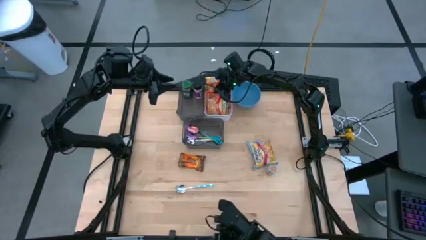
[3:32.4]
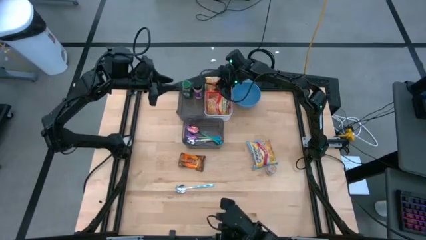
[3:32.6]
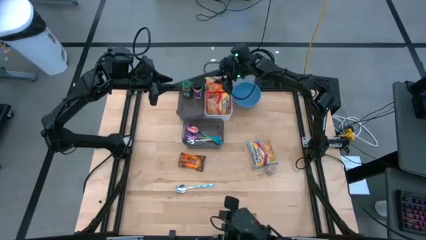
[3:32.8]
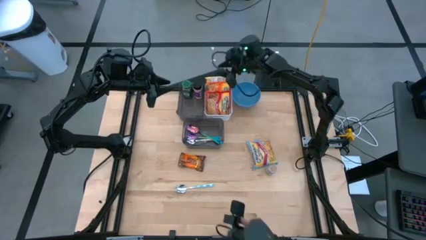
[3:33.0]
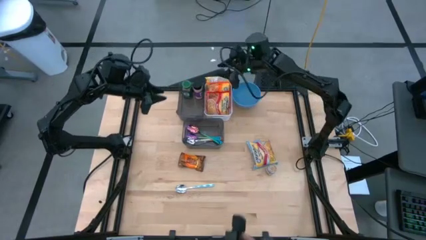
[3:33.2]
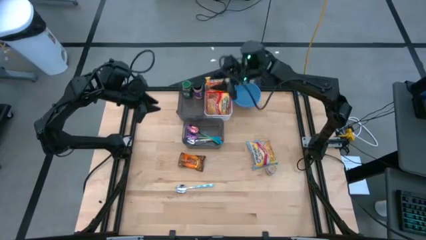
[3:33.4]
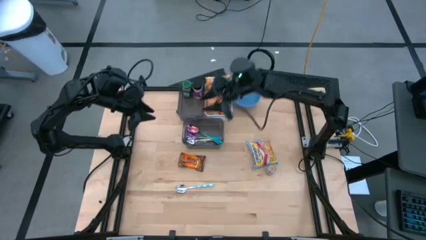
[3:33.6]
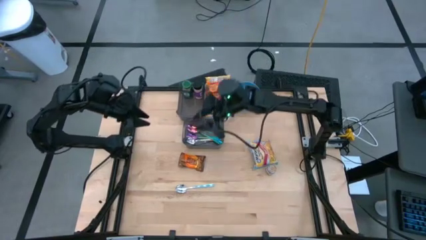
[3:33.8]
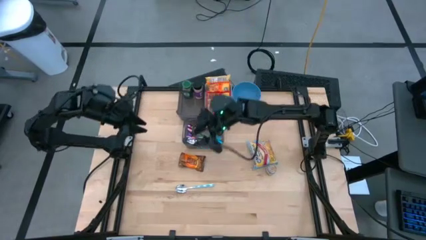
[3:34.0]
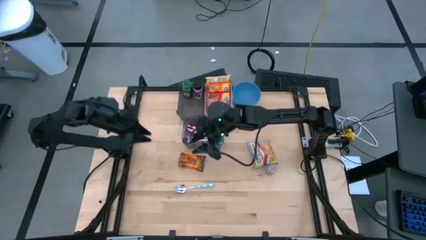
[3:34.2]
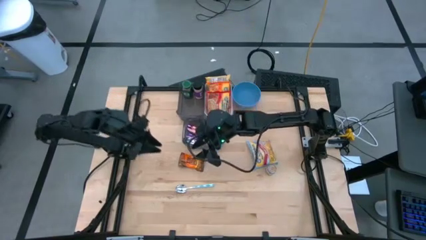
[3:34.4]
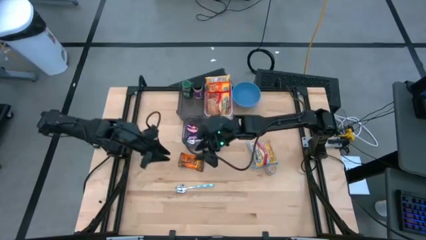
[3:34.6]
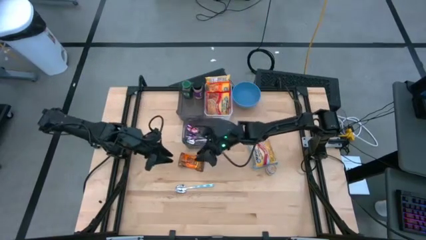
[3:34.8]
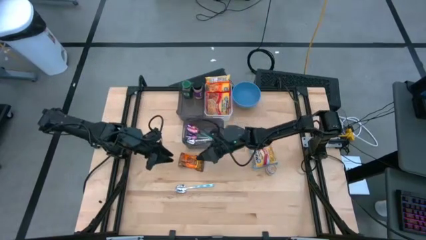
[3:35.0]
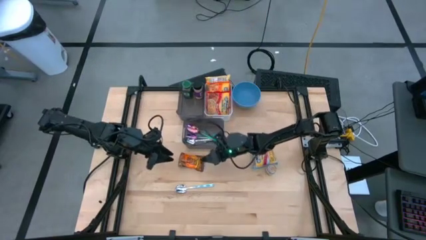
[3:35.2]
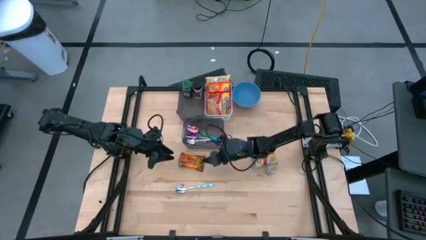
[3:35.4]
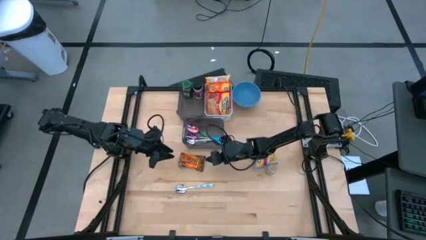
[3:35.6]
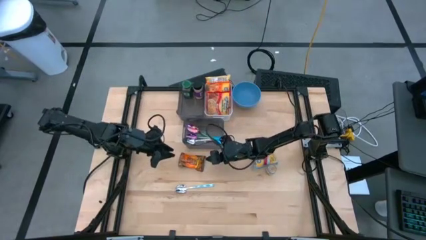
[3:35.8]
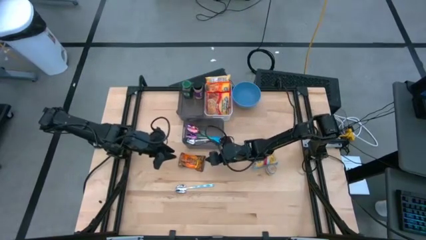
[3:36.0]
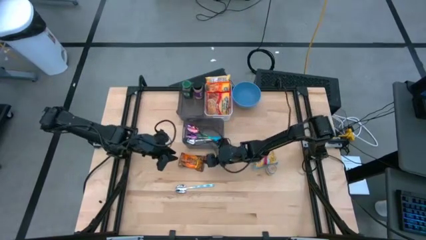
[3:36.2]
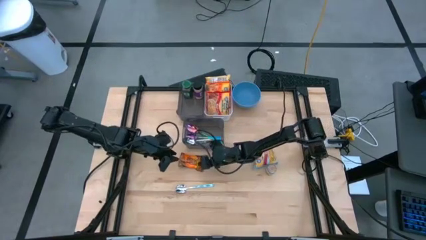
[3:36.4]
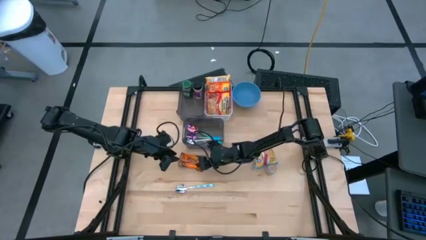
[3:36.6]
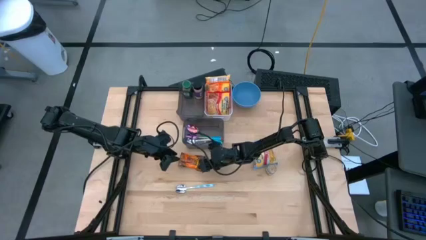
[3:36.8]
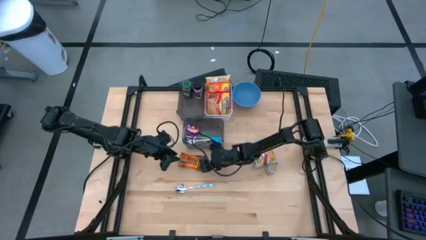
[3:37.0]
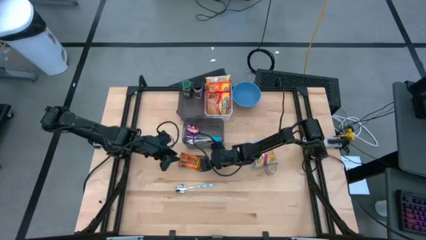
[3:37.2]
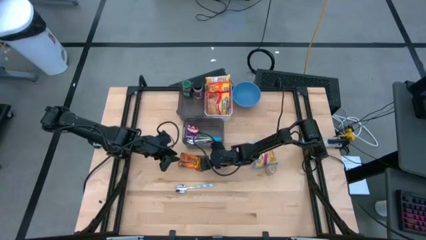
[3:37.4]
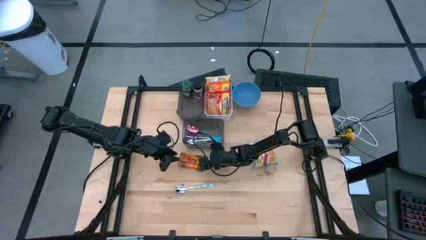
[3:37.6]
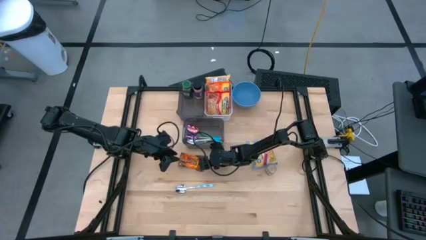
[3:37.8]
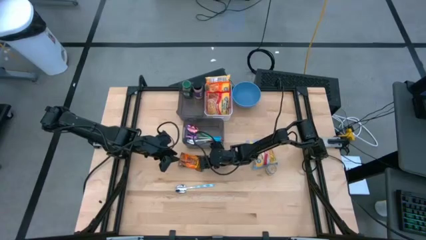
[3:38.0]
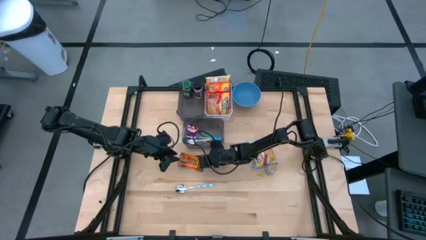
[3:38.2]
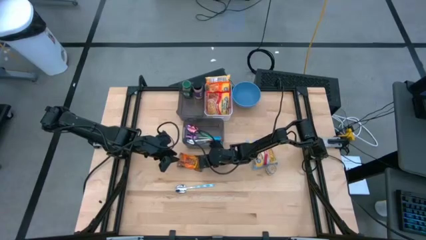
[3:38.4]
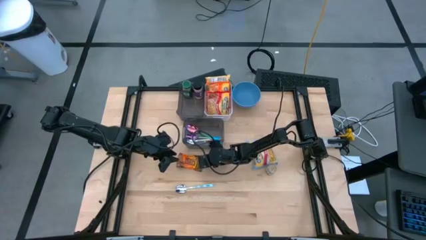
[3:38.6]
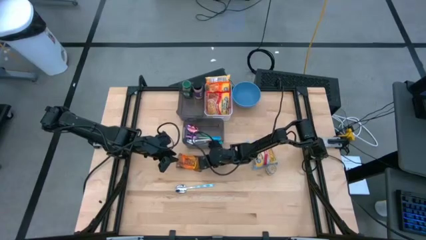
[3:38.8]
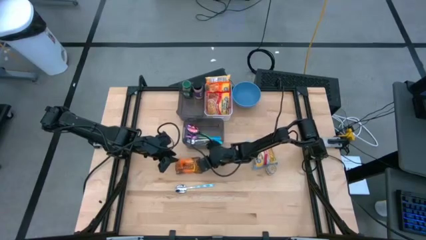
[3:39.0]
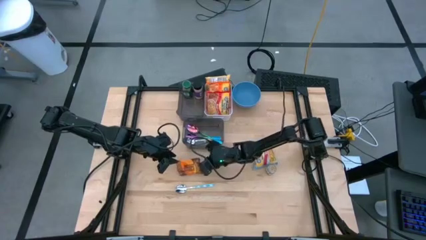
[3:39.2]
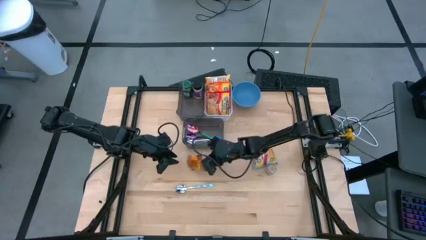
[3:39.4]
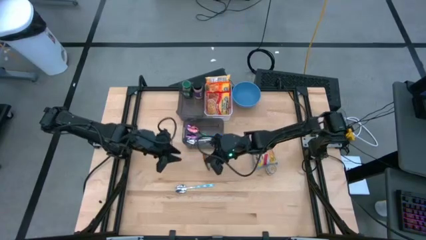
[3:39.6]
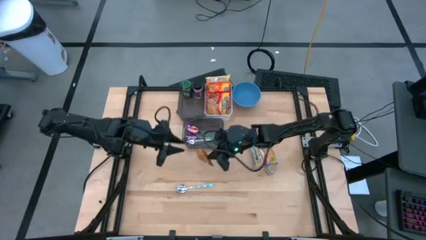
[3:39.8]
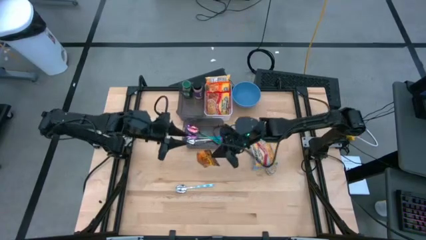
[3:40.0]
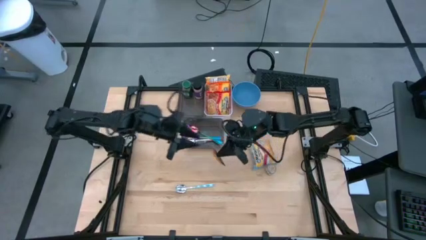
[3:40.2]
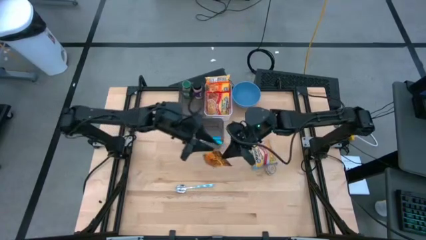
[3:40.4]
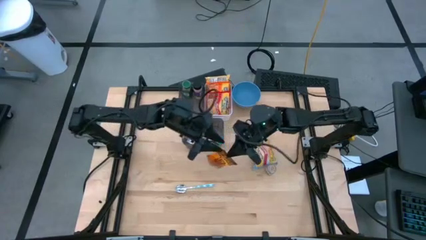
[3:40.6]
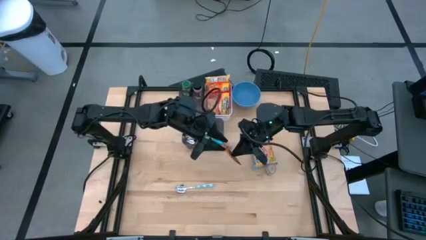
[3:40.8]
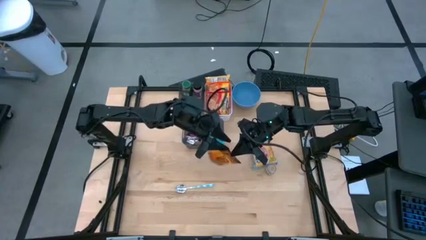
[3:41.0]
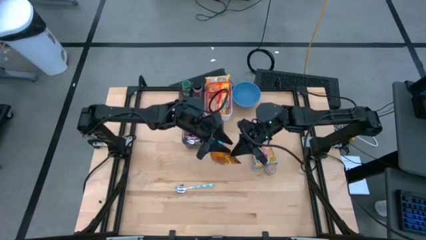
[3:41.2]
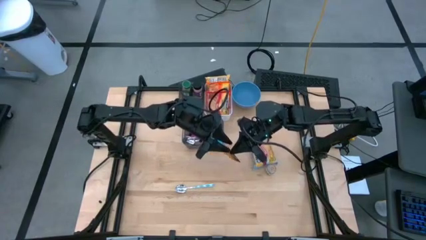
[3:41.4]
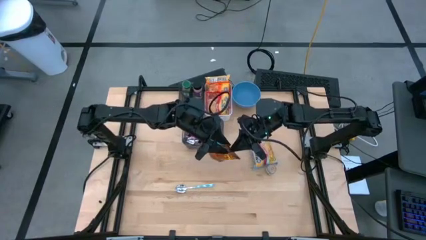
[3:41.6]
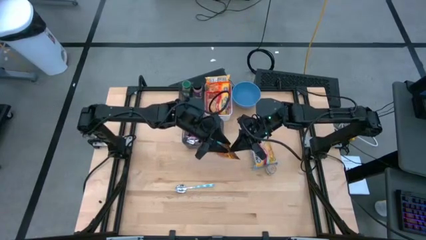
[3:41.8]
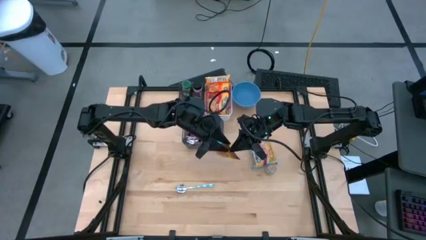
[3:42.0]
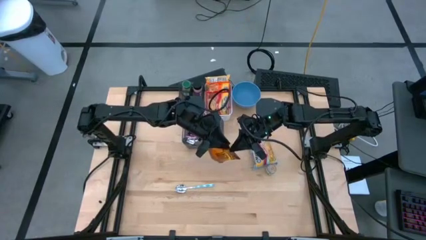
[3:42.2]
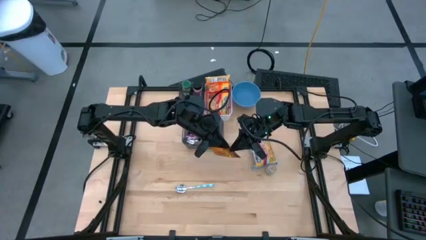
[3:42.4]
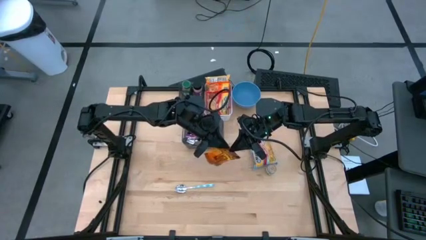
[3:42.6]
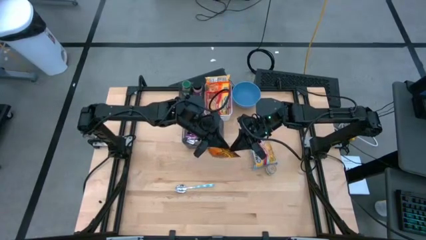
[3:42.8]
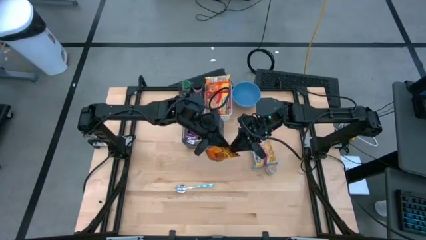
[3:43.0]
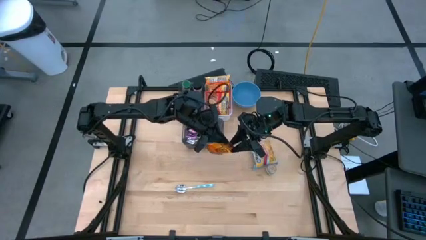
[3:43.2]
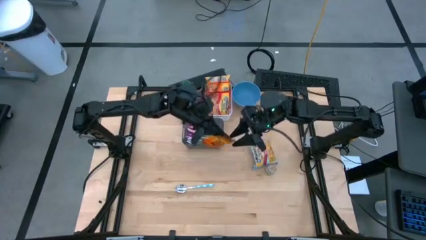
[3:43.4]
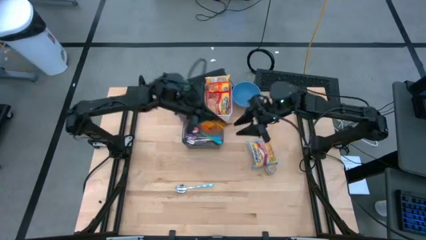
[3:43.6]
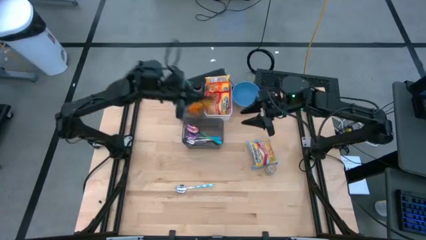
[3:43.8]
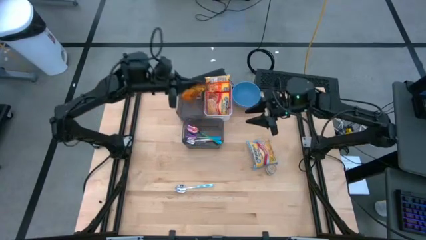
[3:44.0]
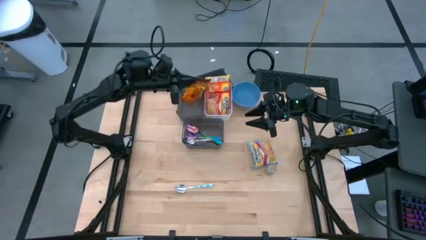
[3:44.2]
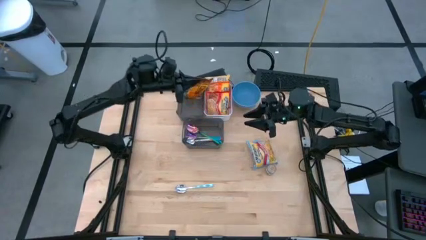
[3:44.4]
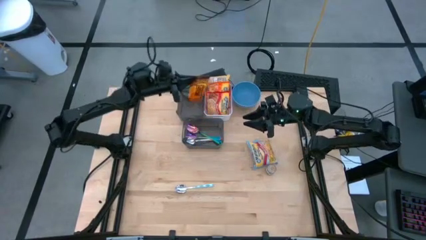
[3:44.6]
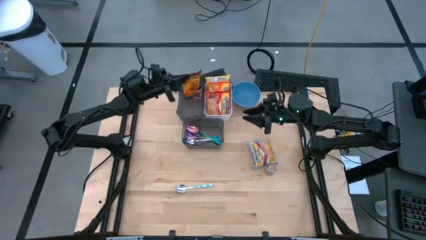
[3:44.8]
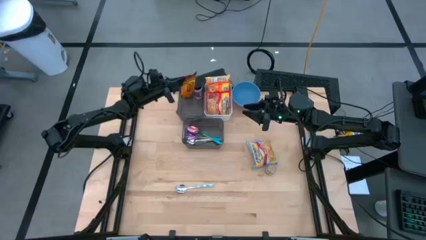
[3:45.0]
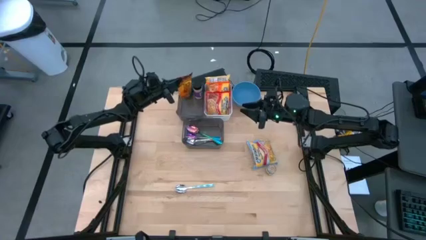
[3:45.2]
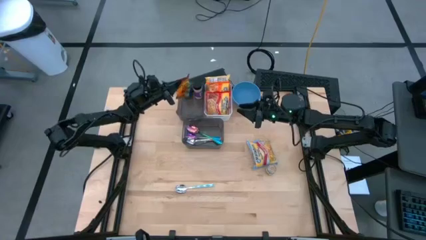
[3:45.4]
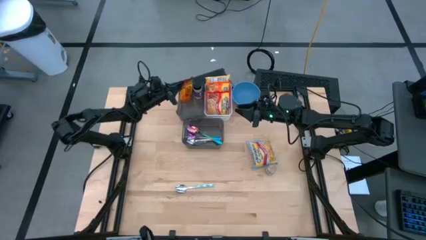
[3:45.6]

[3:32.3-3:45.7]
Task: Pick & Place Food Item
Put the orange seasoning pack into the top black bin

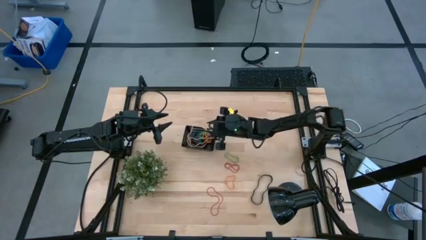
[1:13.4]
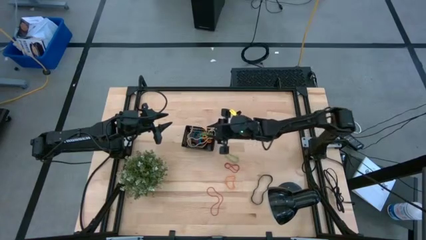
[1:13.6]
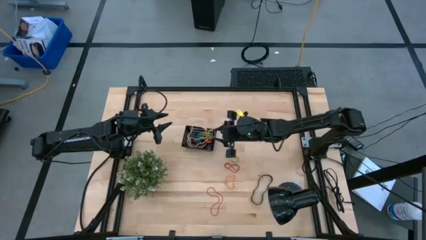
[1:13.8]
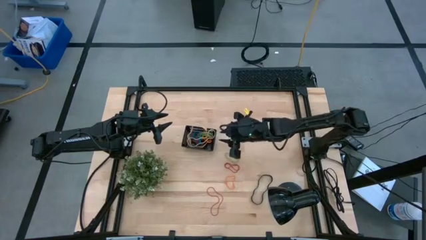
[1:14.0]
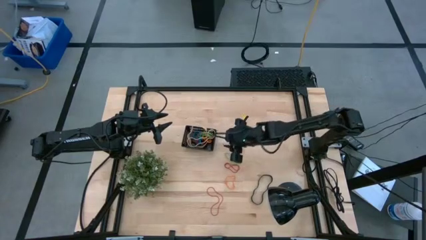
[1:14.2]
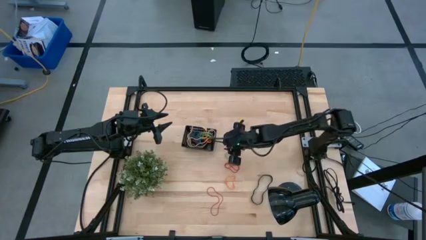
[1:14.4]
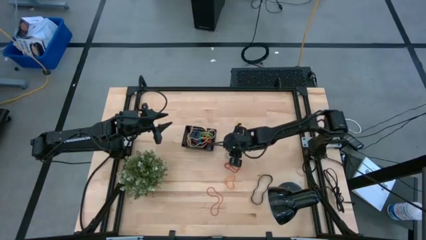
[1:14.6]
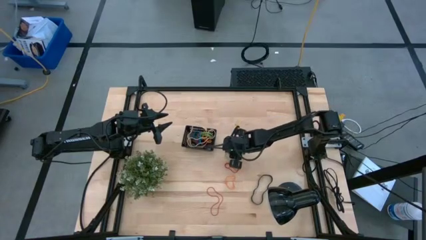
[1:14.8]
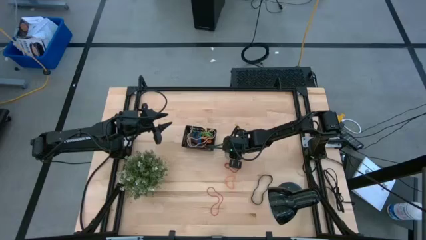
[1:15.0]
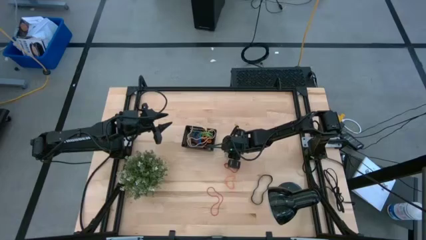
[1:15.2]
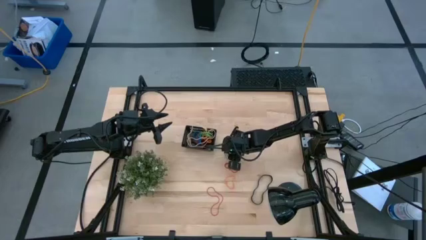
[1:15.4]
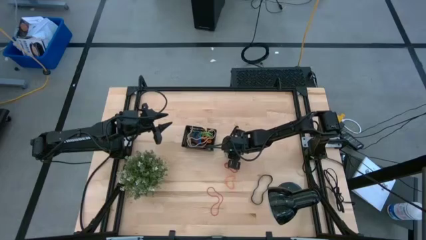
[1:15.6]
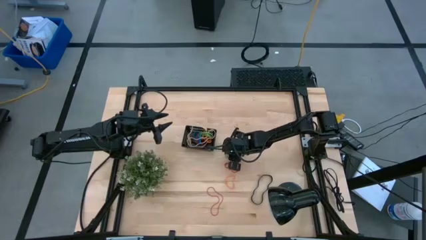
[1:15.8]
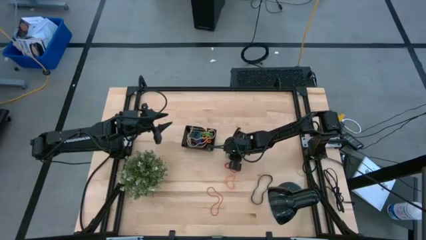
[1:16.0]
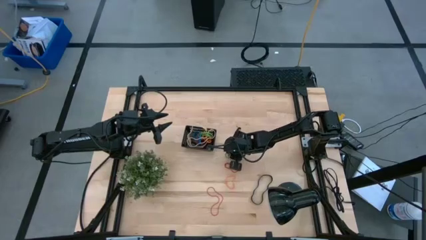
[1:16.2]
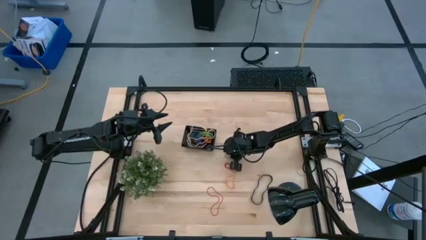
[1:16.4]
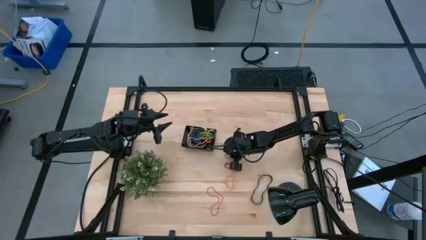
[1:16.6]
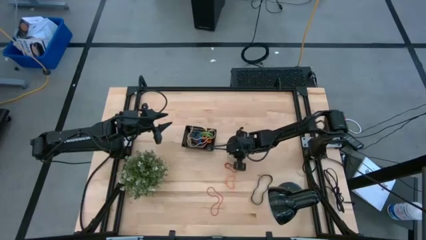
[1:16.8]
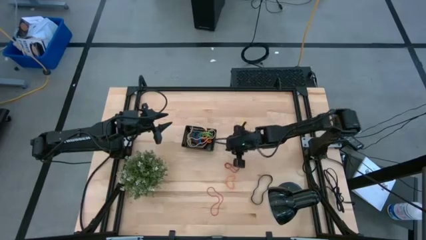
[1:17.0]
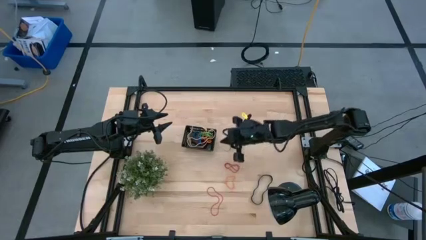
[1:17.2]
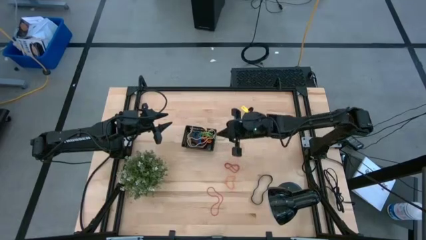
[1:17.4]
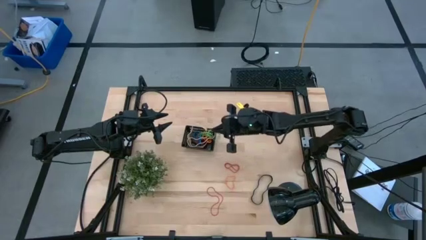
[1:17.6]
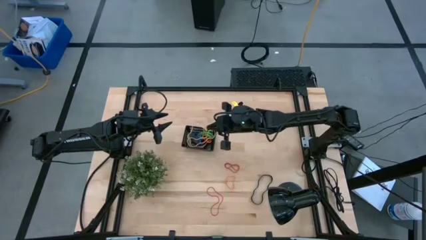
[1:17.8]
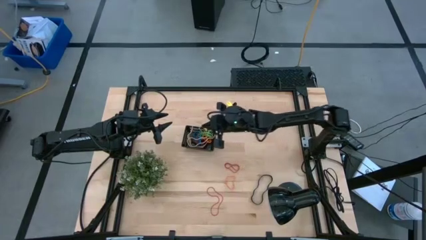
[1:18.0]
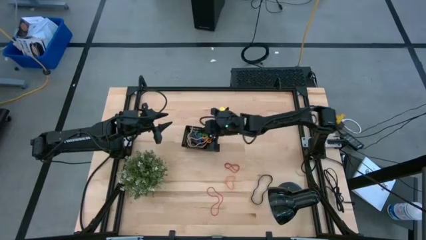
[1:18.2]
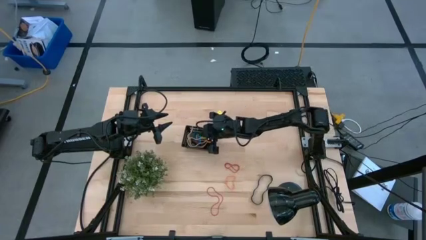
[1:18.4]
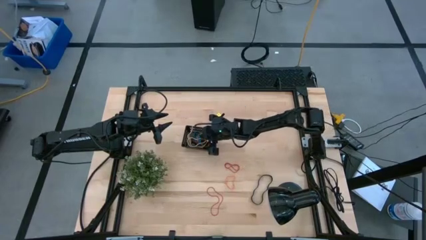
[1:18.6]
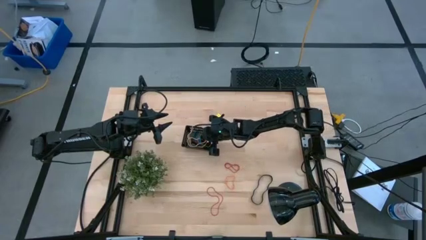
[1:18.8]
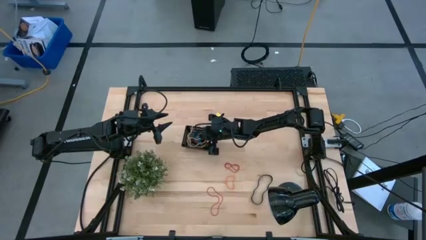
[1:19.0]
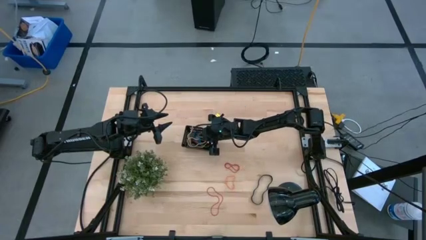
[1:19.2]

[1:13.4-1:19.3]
Task: Pick and place rubber bands into bin
Put the green rubber band into the black bin
